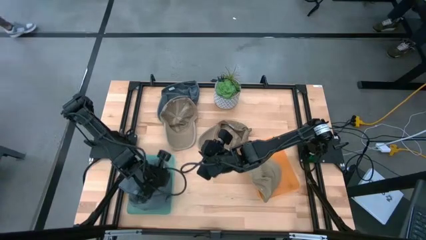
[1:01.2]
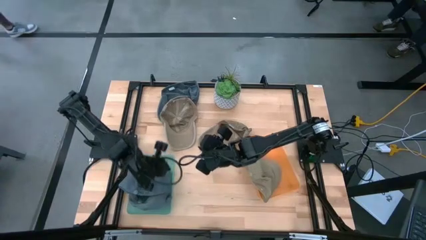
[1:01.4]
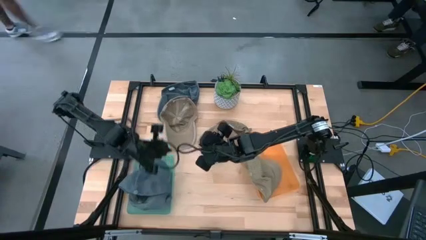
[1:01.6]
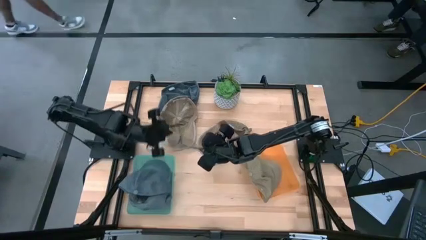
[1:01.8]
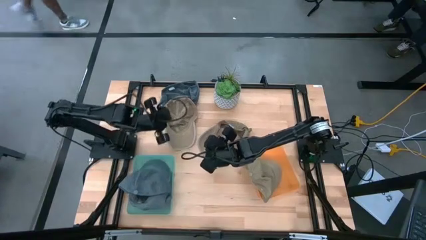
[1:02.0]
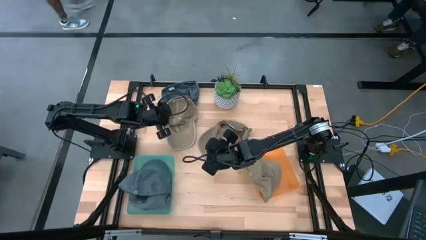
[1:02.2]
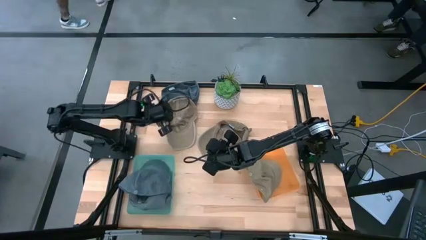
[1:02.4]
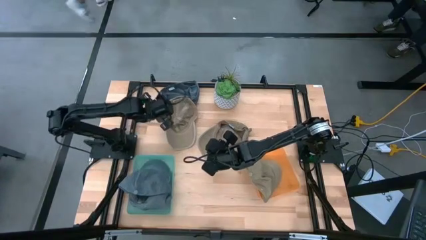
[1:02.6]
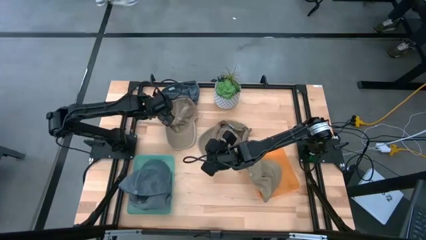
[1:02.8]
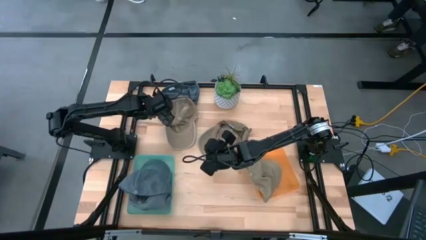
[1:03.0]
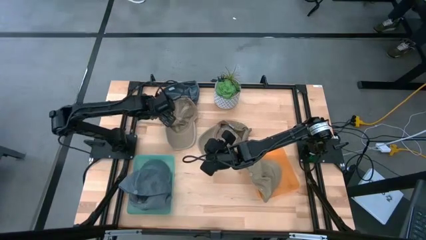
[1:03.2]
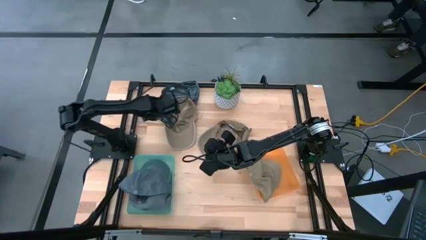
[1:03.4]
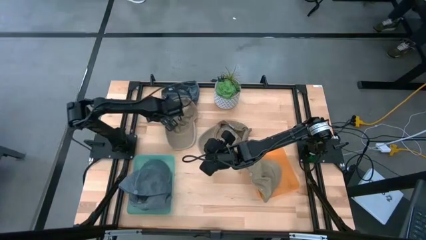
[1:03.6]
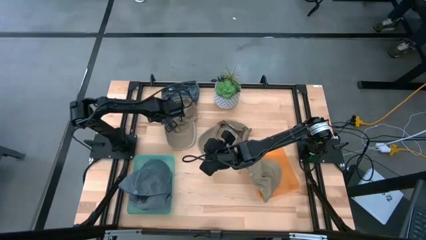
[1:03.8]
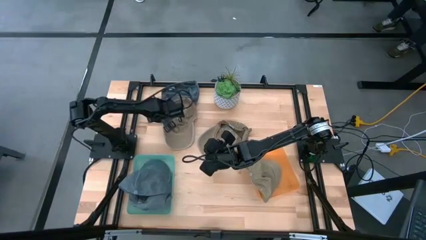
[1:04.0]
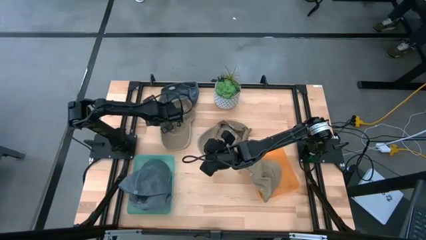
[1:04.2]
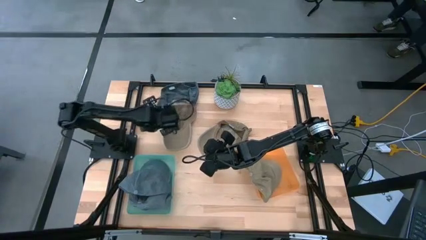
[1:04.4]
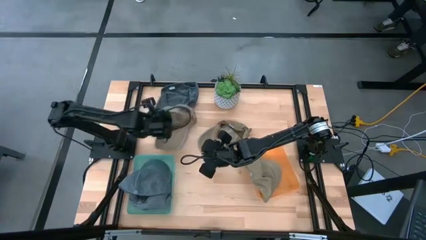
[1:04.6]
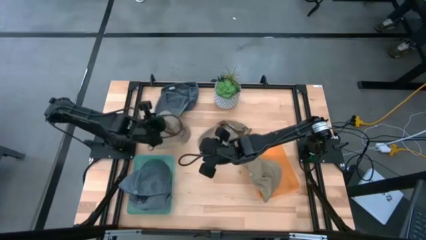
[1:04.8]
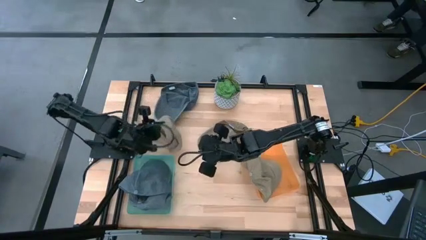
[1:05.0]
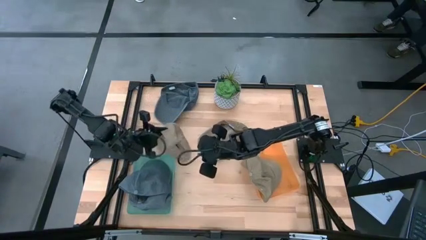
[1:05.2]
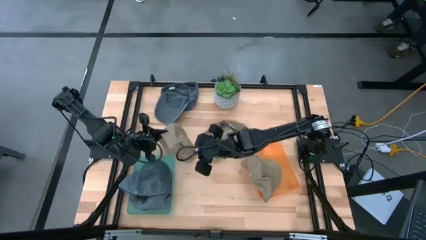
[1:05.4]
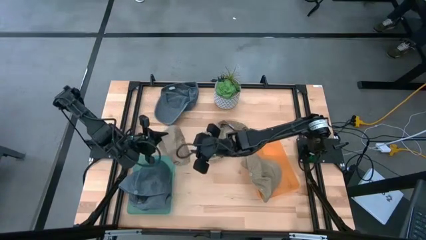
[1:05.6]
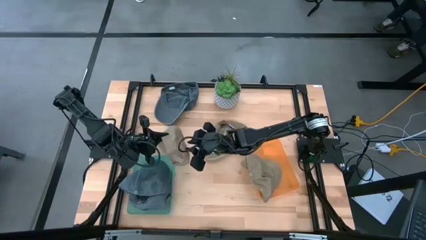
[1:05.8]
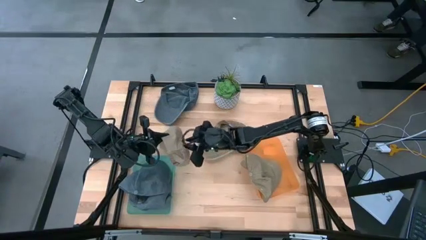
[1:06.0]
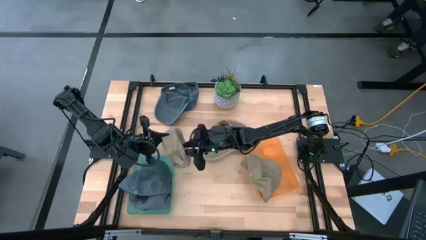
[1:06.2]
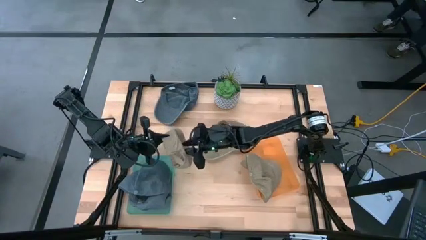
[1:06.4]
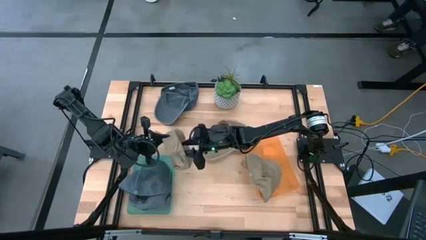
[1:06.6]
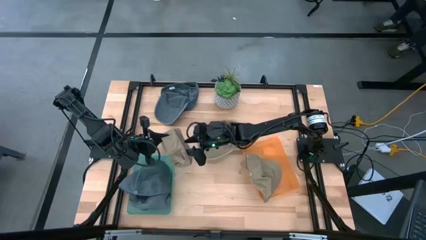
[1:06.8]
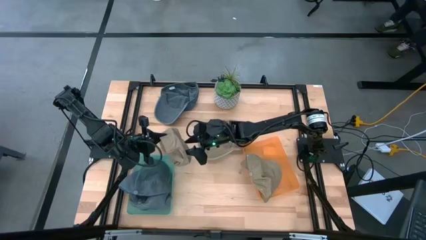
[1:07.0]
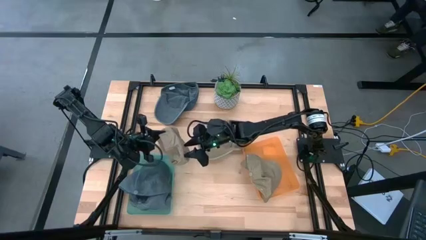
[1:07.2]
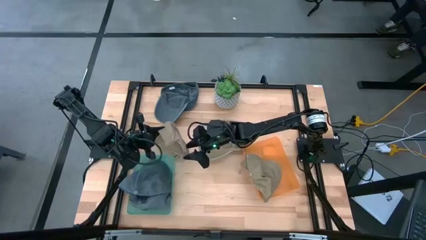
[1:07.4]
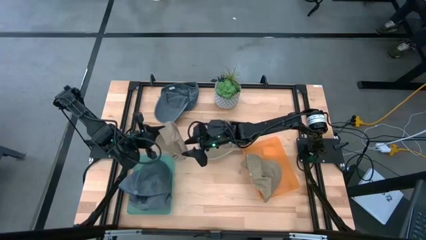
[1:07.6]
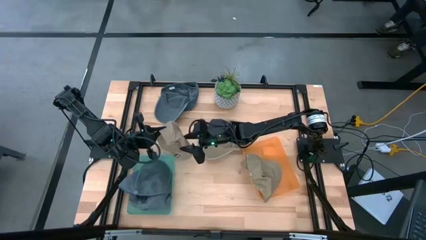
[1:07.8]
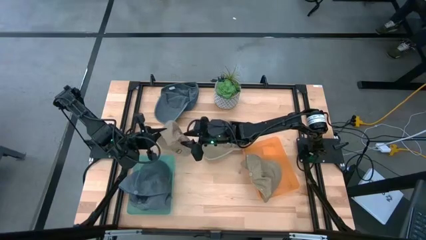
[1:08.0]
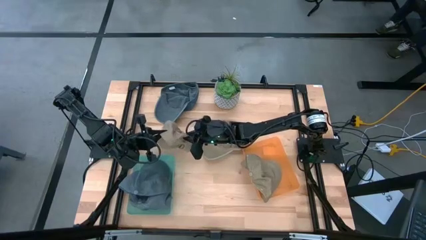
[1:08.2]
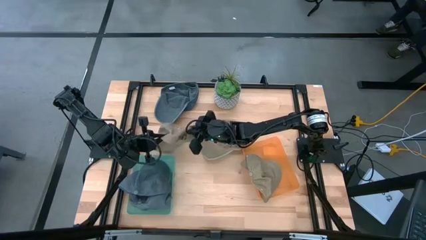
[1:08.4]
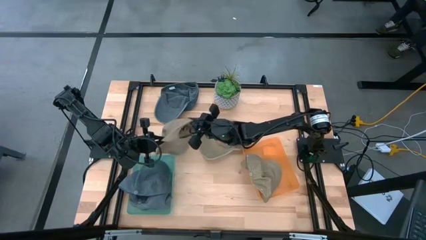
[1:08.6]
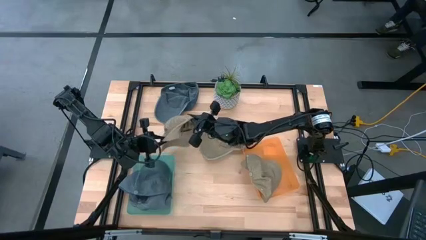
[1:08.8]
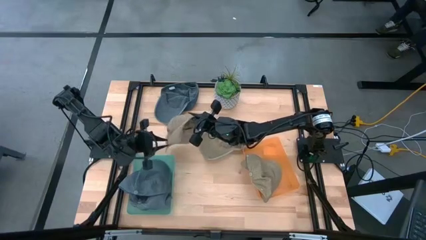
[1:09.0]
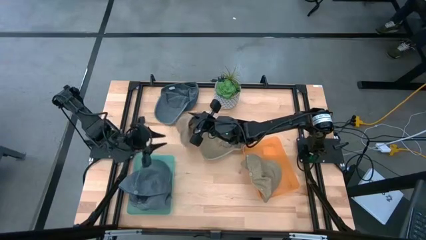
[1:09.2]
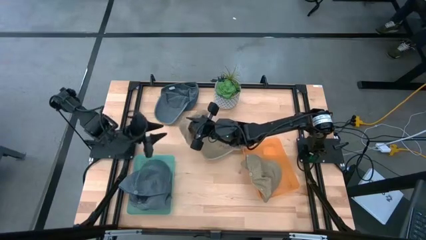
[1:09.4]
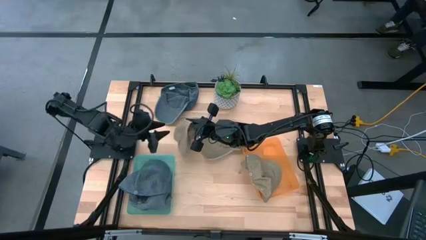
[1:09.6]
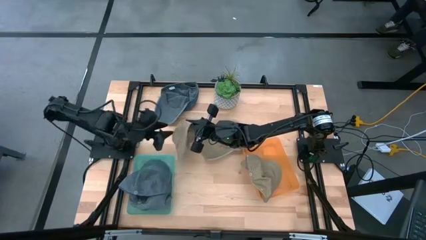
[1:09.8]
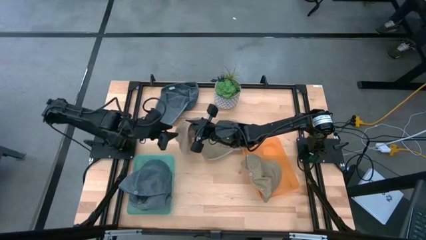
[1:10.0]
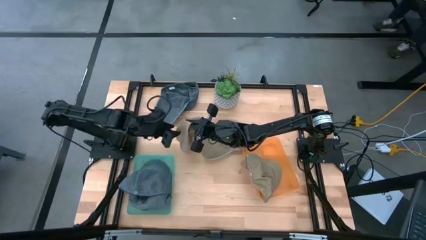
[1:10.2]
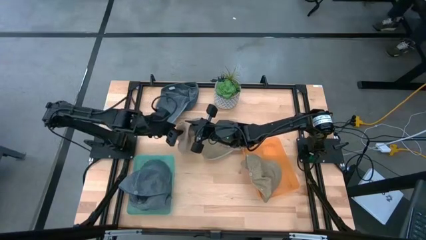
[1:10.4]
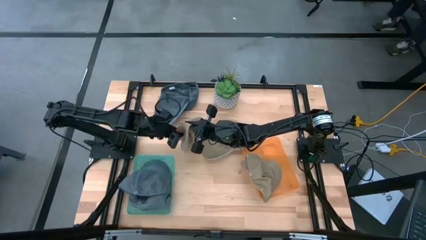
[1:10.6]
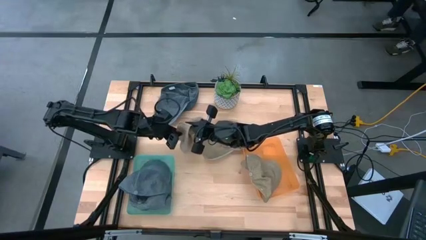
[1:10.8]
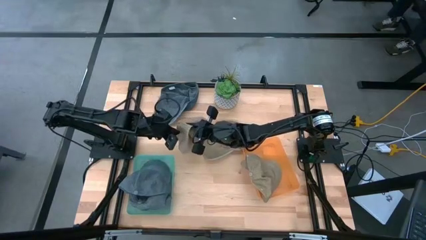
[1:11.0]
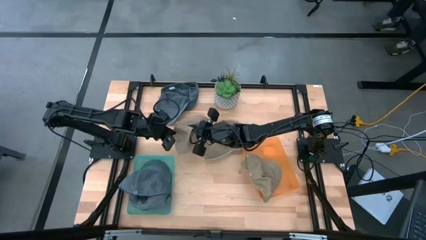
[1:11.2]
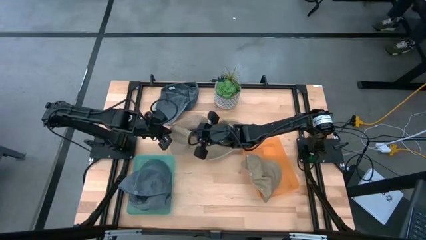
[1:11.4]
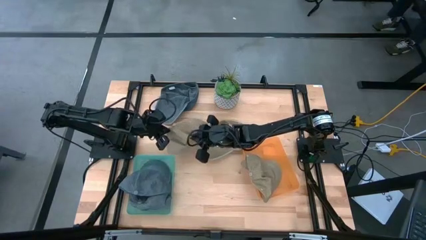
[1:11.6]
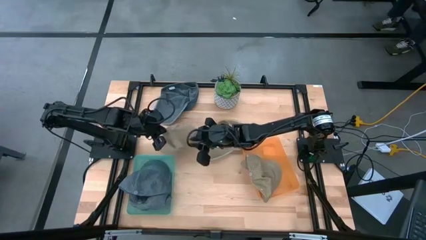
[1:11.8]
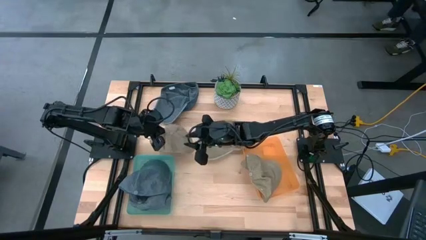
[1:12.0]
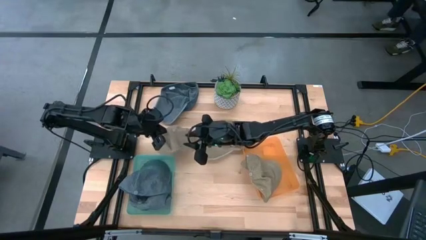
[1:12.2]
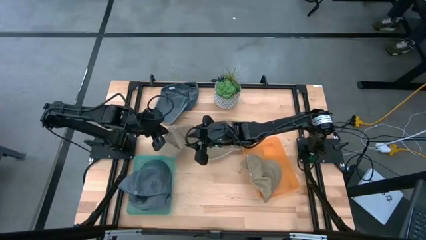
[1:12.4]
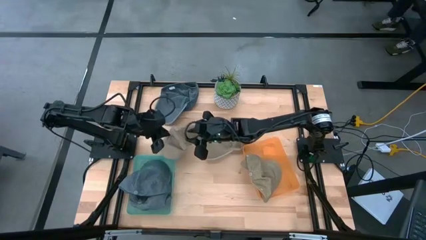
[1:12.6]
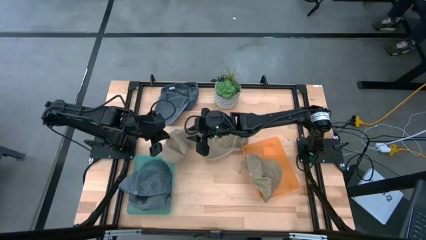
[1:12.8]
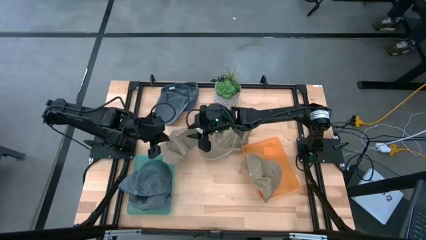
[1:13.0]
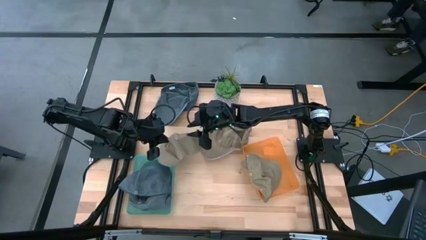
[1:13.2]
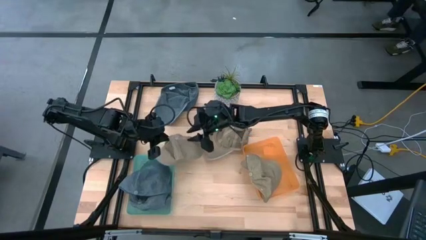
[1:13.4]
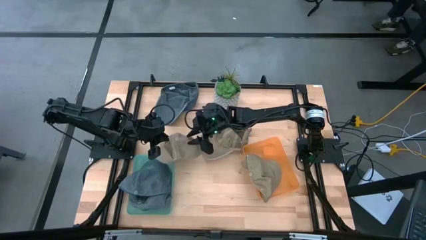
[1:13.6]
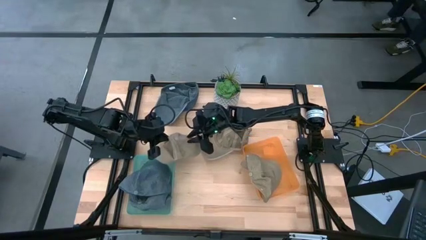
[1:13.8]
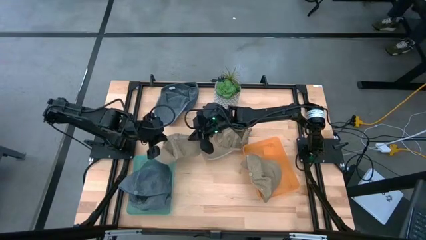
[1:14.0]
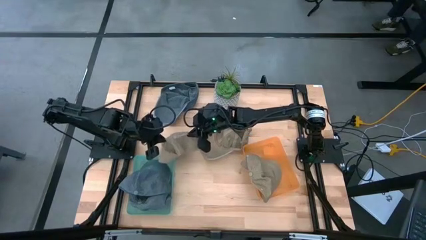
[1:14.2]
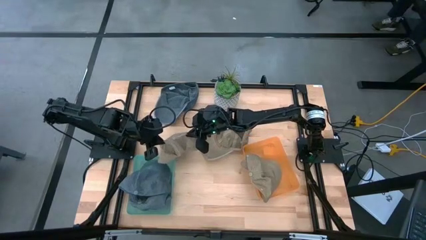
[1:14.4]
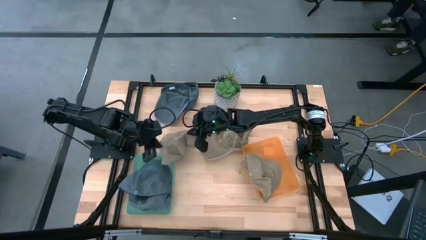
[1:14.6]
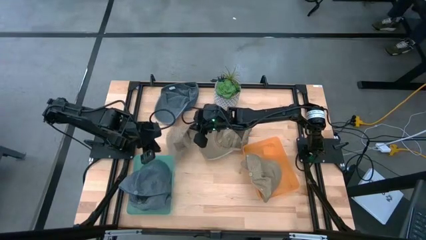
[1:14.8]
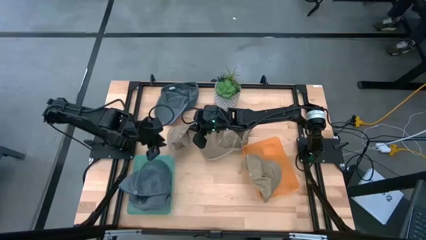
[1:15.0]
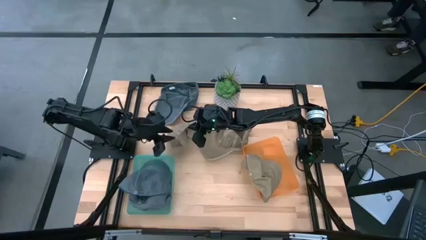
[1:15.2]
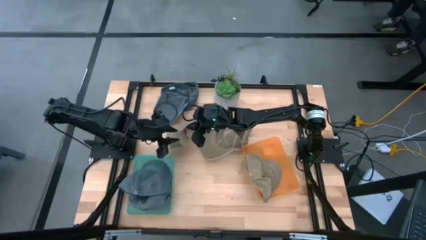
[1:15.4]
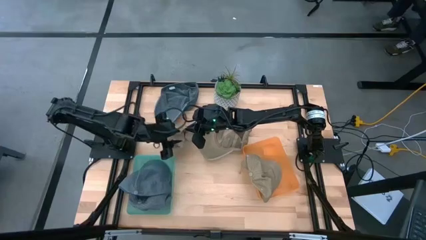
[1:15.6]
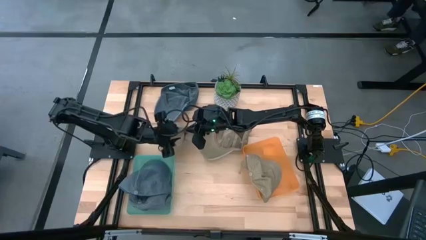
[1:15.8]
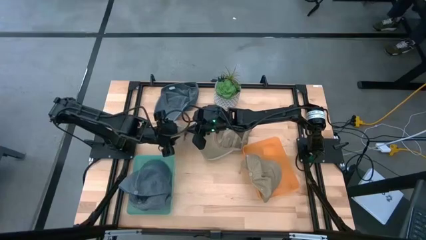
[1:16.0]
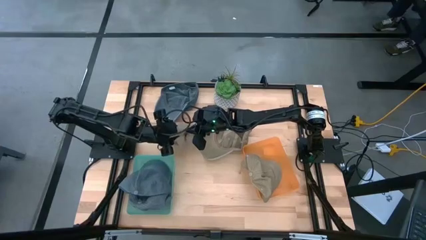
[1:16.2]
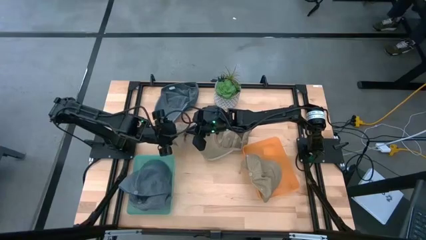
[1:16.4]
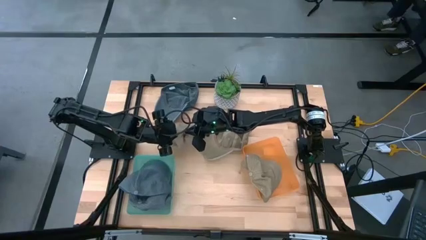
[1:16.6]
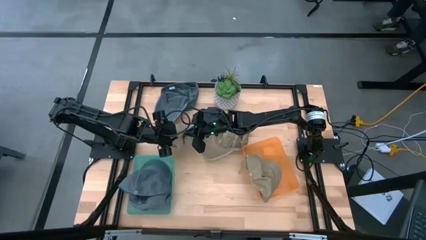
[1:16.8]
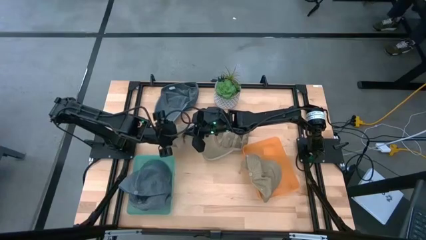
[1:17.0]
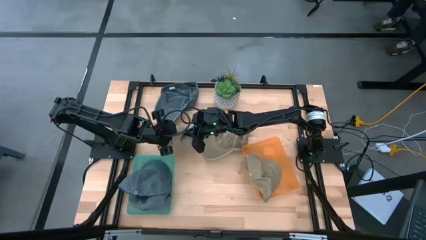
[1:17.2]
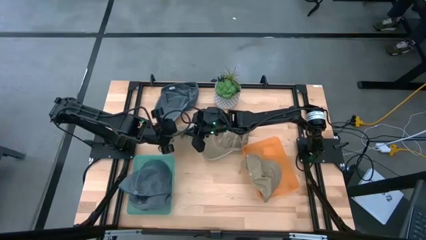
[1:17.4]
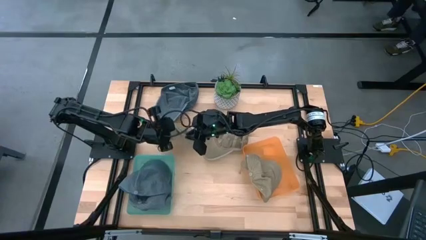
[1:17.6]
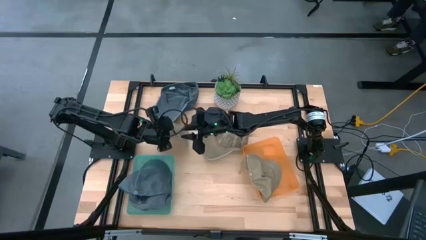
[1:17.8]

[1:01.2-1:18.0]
Task: Pick & Place hat
Put the left brown cap into the orange bin

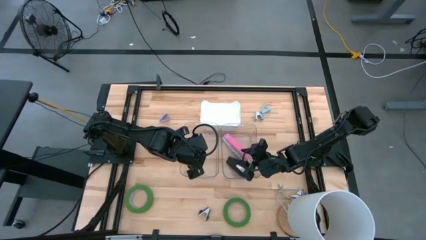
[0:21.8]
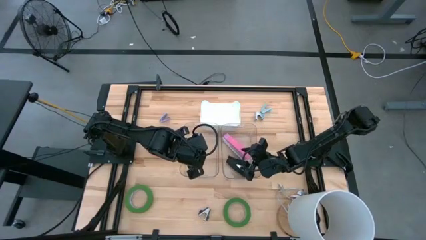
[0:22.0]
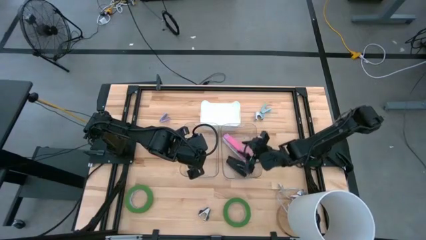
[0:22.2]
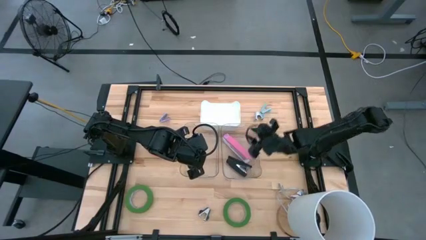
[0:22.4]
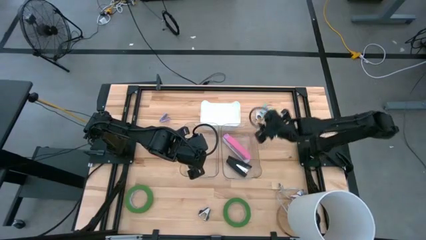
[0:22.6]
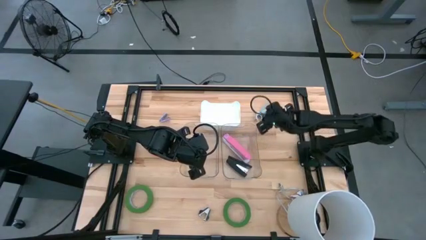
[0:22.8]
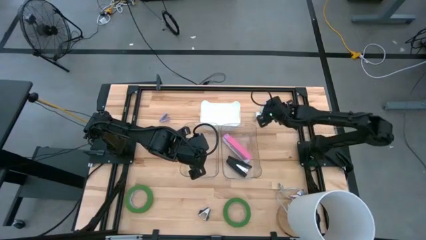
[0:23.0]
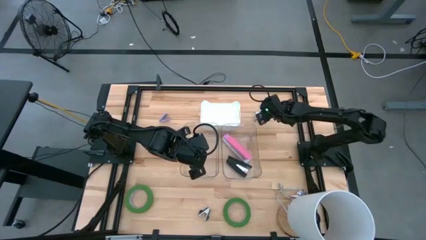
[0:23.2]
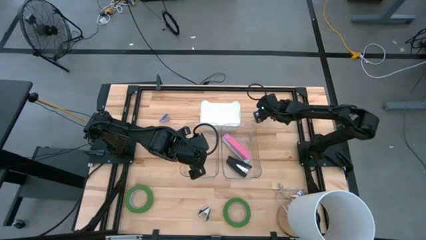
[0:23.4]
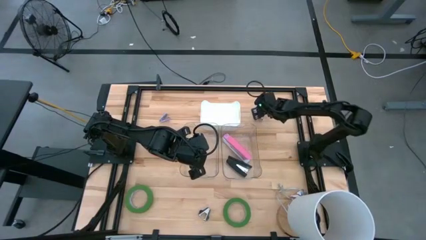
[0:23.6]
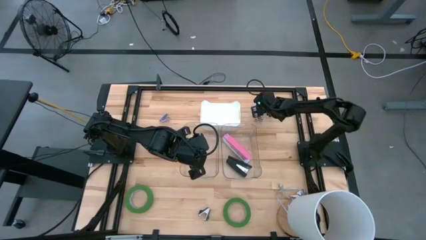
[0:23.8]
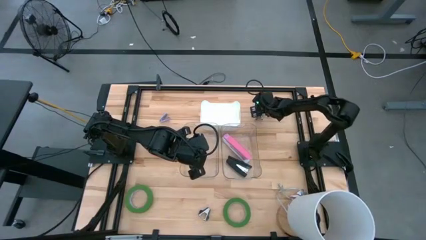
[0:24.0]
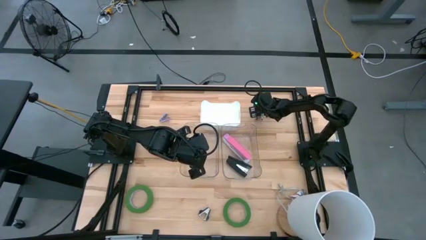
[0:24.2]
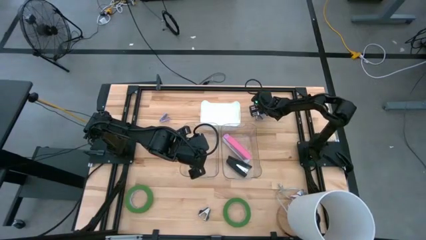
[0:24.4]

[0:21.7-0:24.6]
Task: Pick and place Stapler, Stapler remover, tape
Put the light blue staple remover into the white bin
